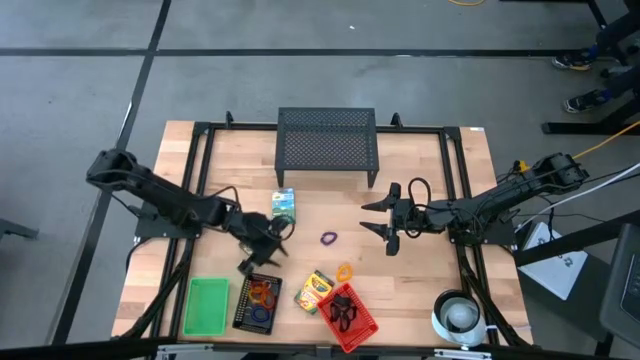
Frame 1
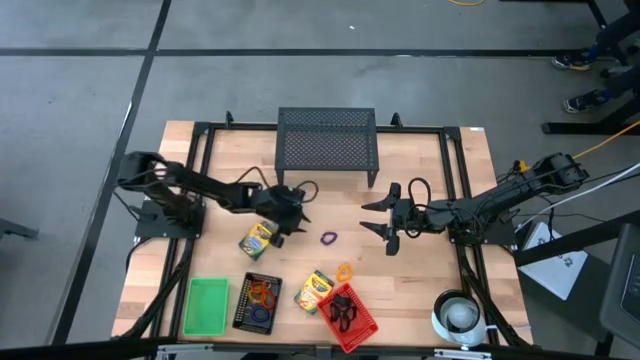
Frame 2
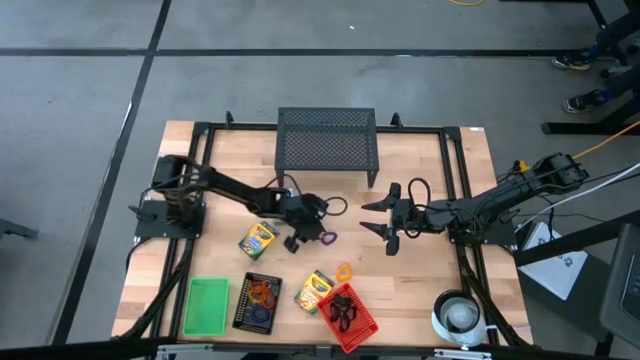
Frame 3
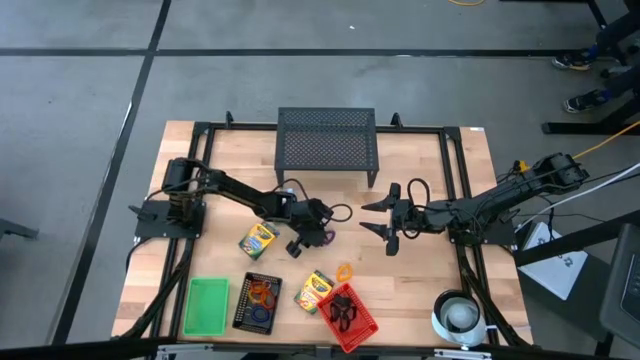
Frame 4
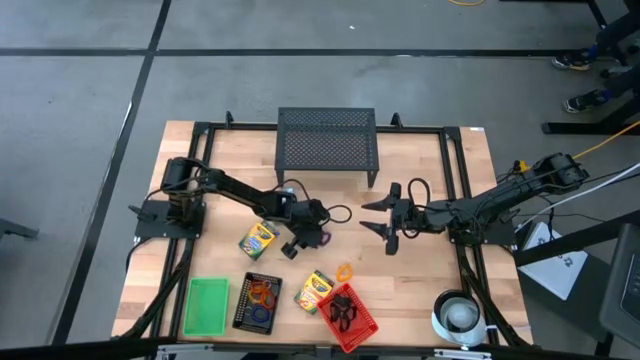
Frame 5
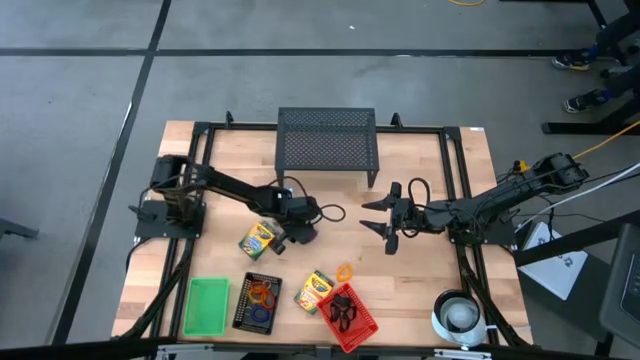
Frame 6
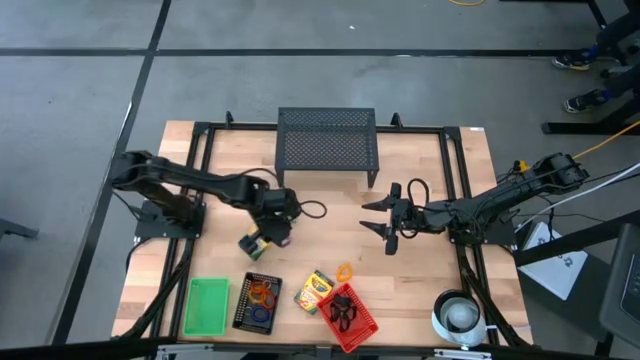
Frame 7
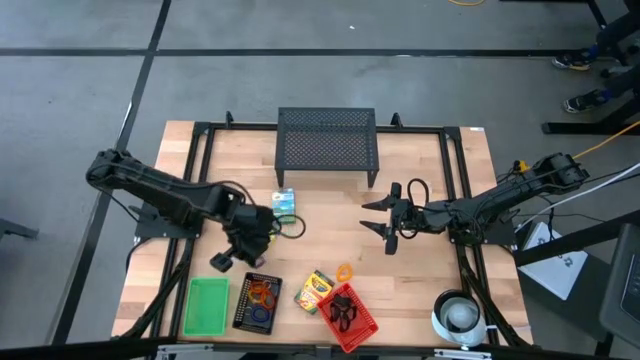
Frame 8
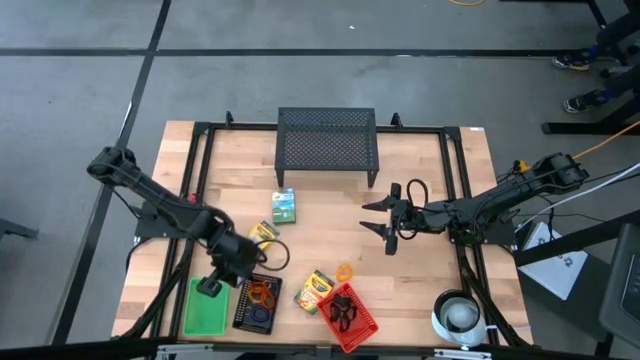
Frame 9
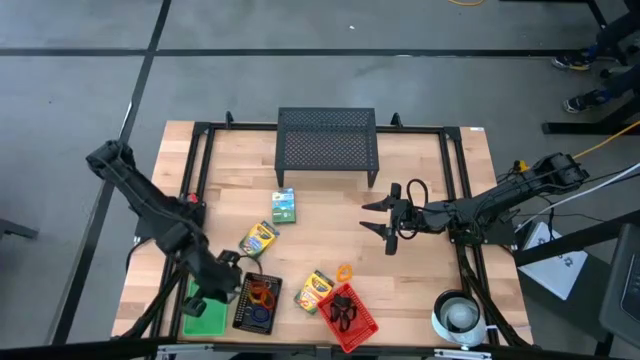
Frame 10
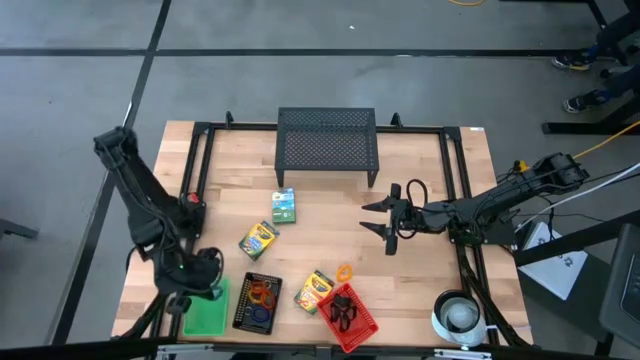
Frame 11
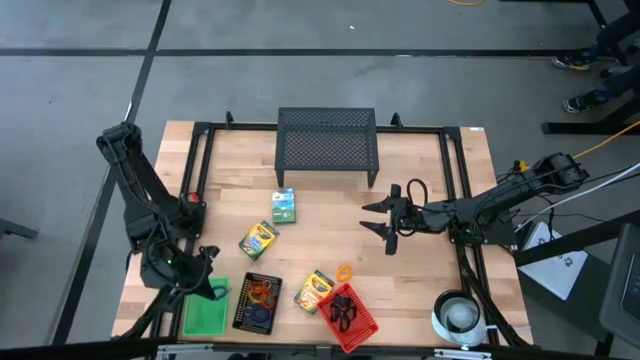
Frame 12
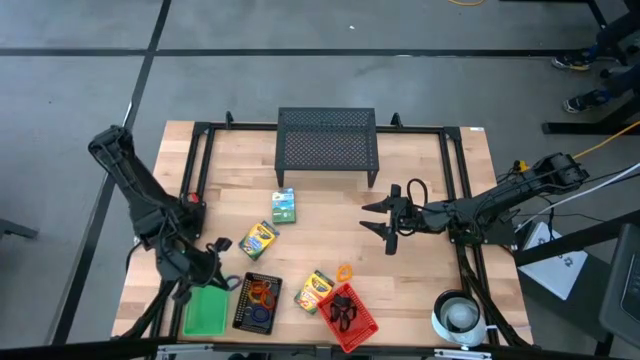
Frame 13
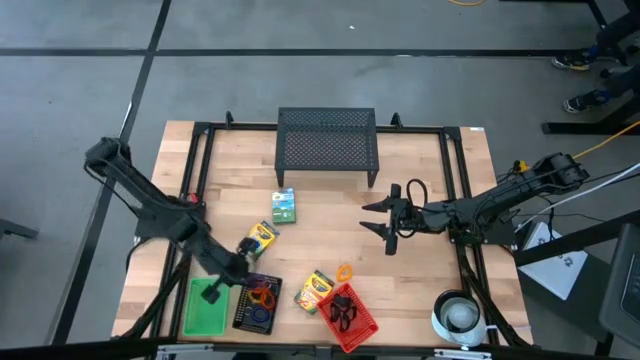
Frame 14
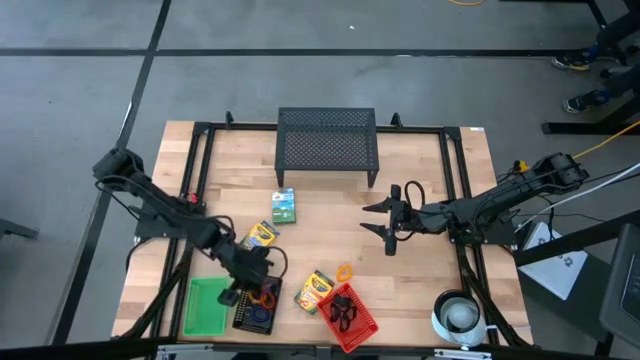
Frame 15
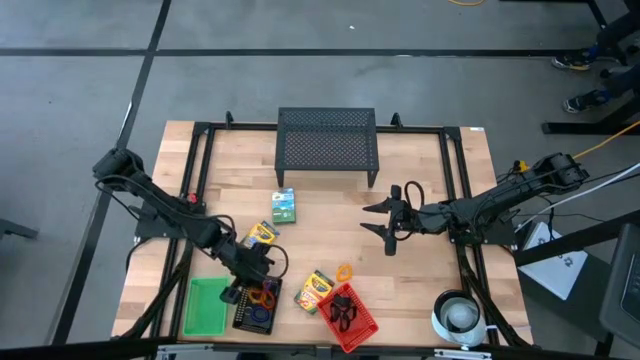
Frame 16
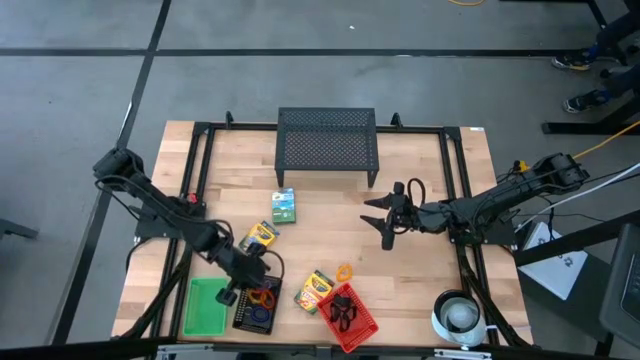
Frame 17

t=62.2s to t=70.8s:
Task: Pick & Place Office Desk Supplies
Put the purple spring keychain into the black bin

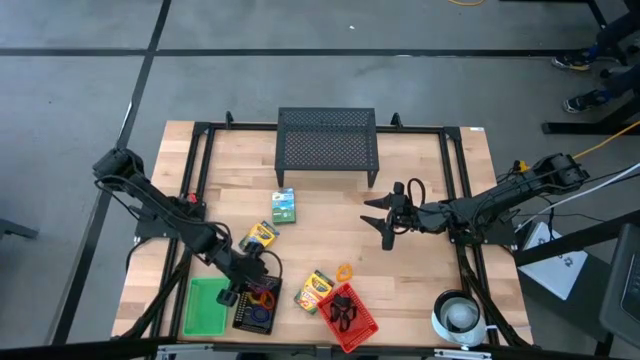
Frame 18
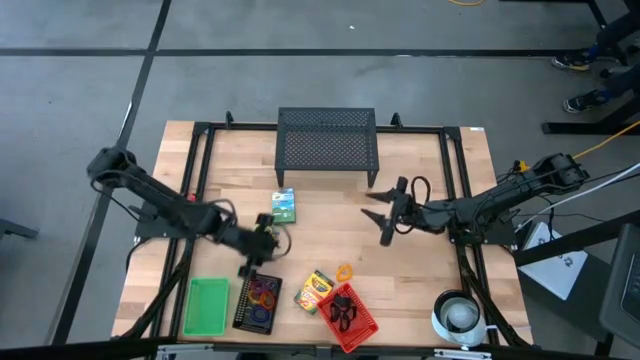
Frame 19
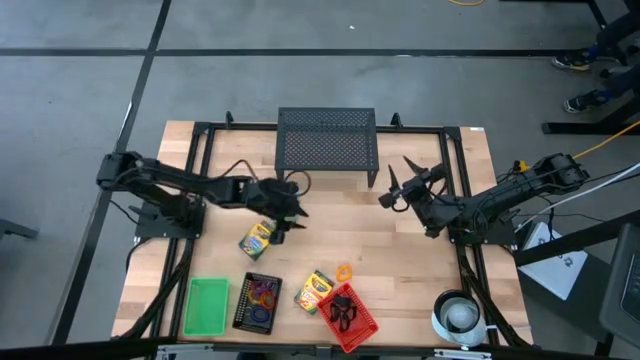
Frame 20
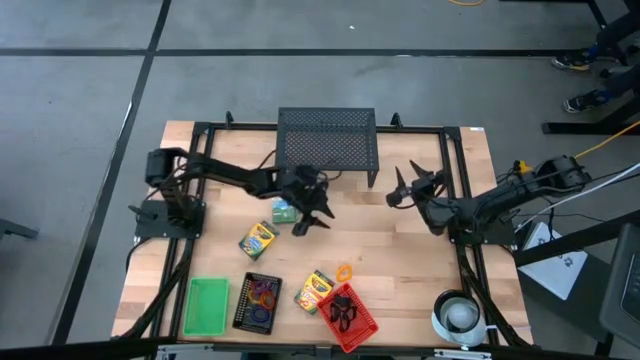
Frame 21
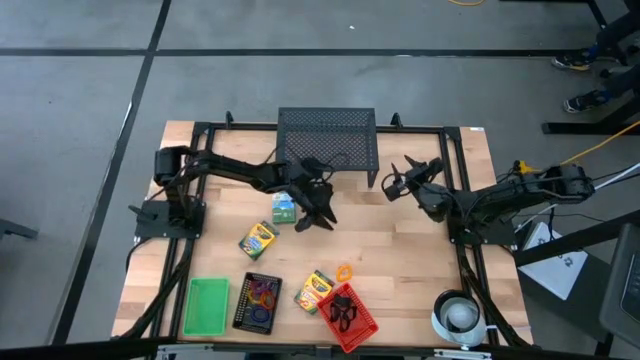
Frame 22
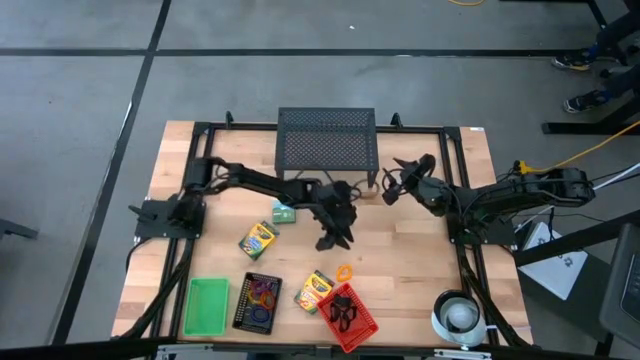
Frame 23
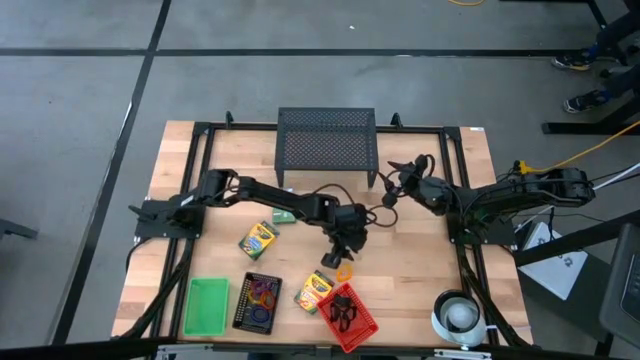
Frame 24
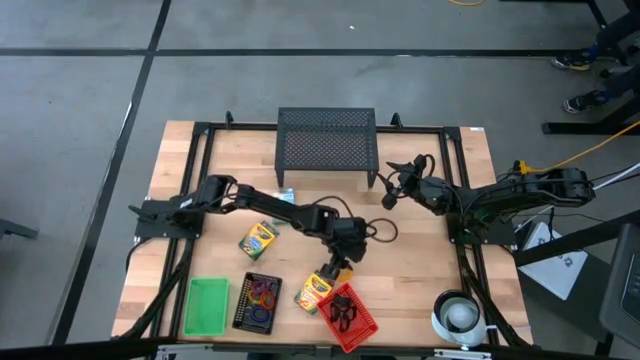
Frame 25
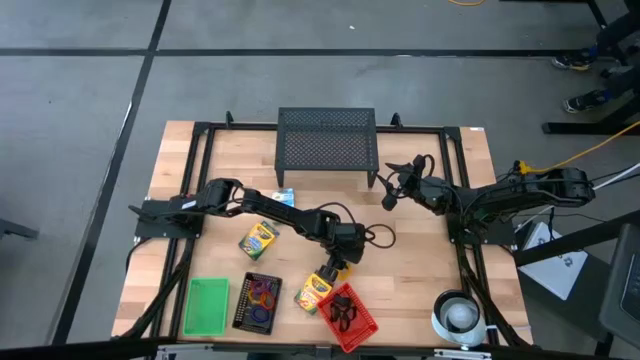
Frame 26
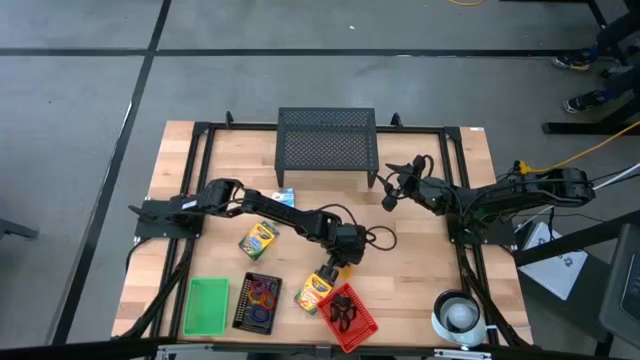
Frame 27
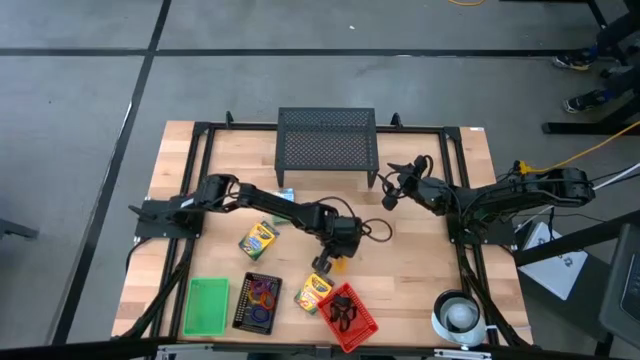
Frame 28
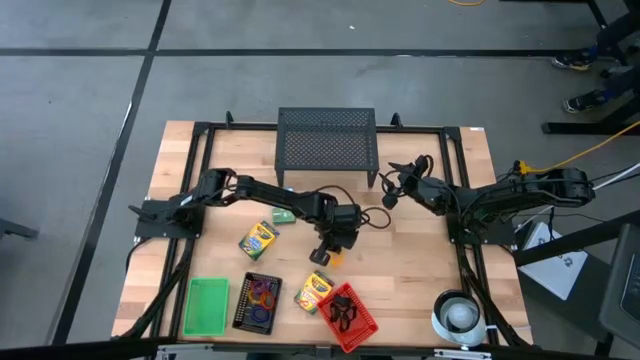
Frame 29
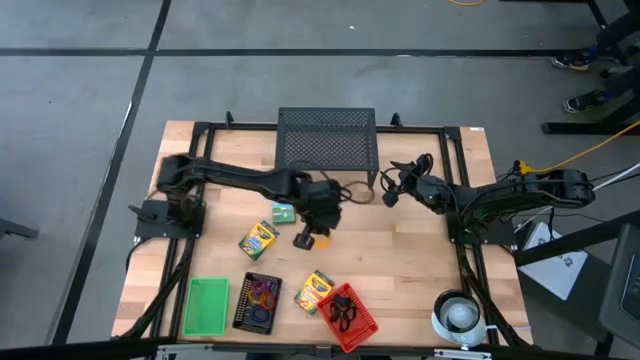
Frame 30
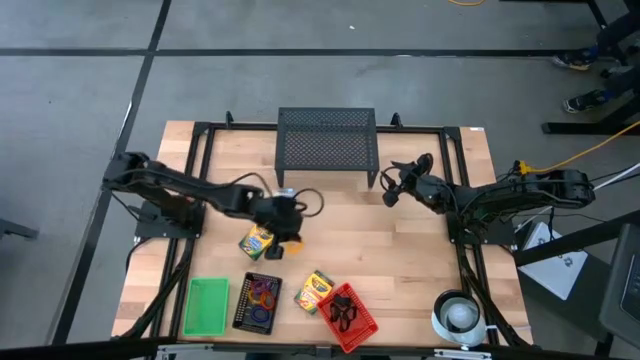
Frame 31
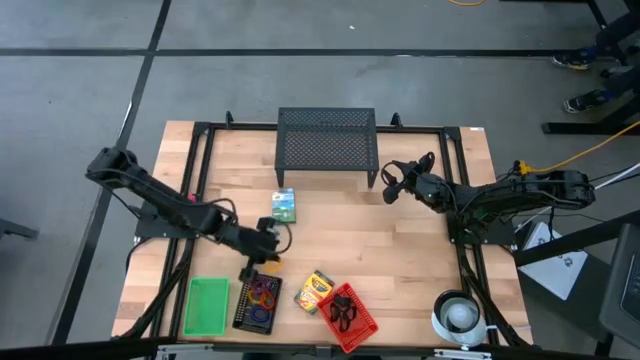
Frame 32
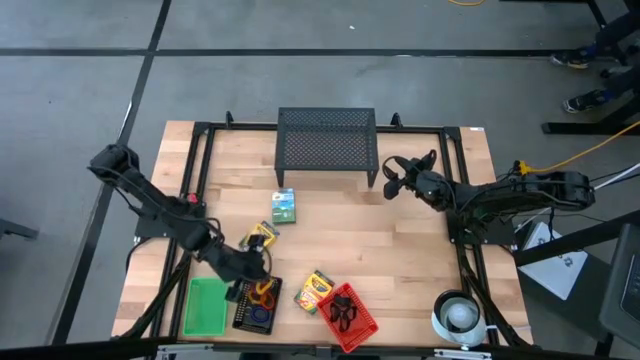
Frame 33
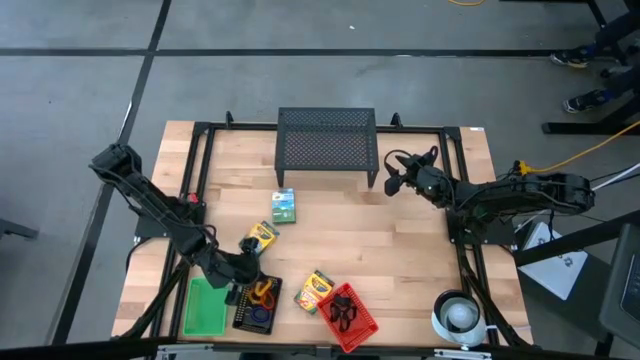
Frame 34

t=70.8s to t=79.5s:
Put the yellow spring keychain into the black bin

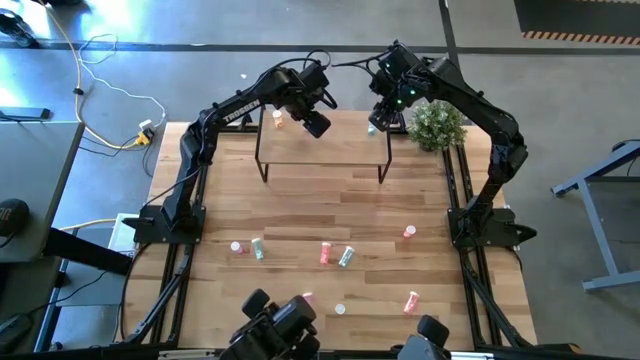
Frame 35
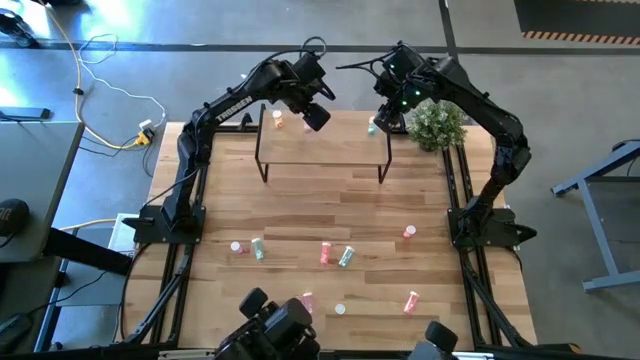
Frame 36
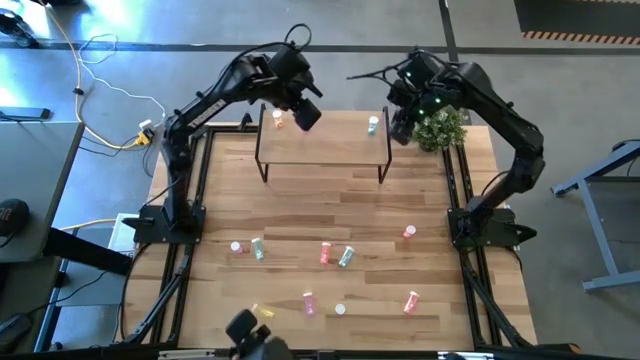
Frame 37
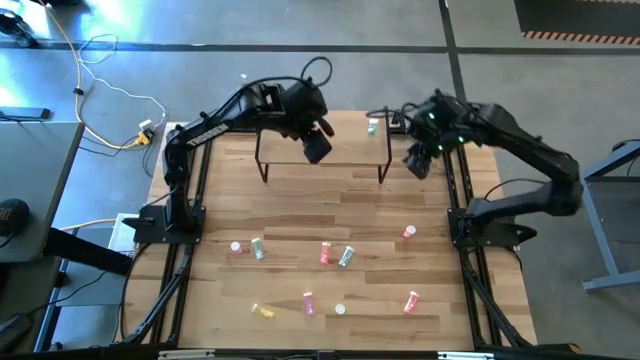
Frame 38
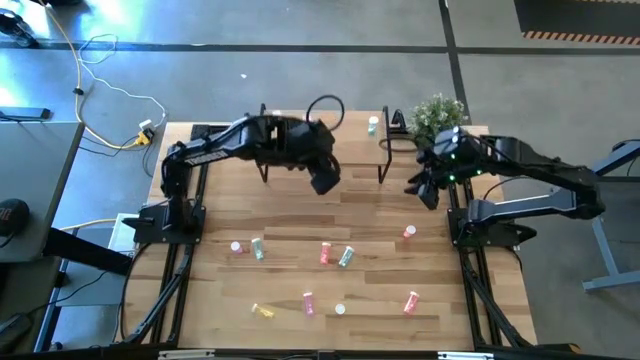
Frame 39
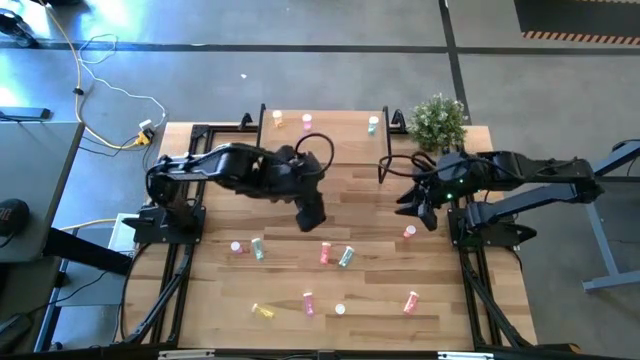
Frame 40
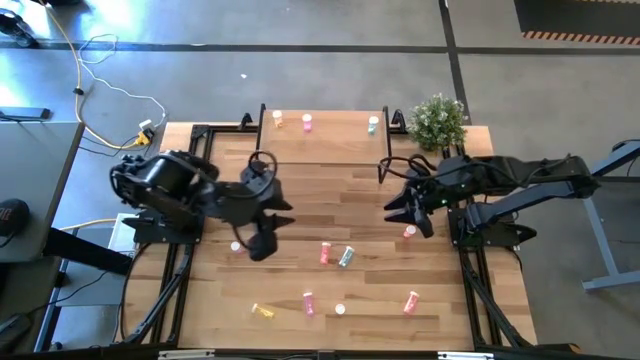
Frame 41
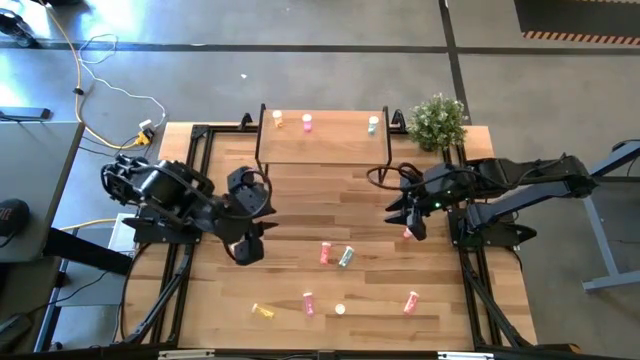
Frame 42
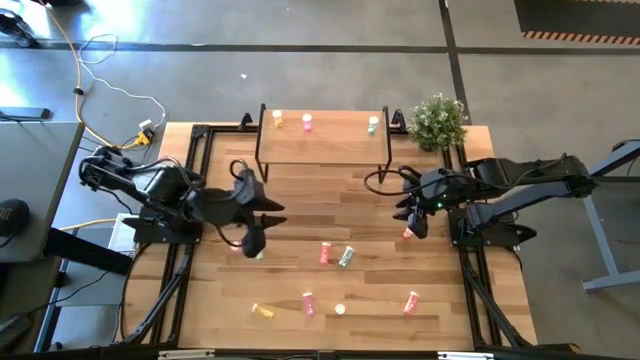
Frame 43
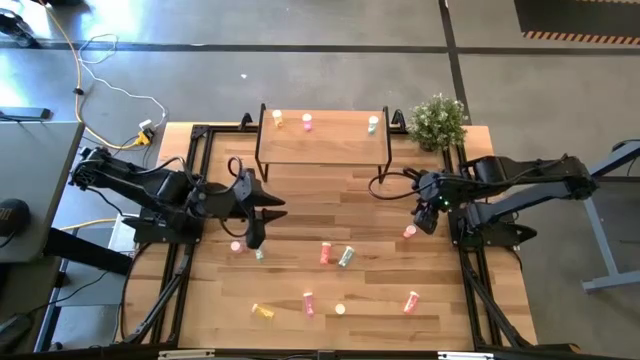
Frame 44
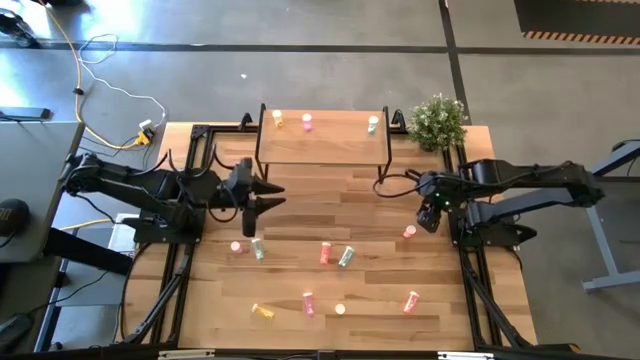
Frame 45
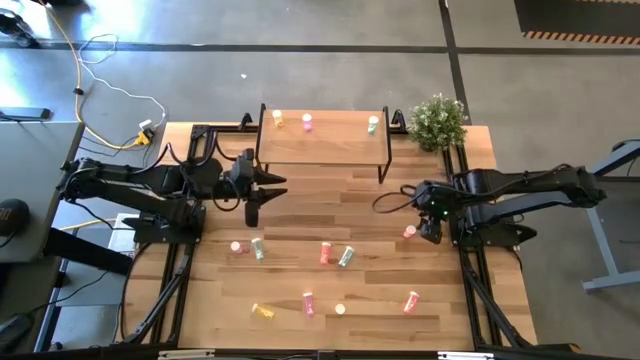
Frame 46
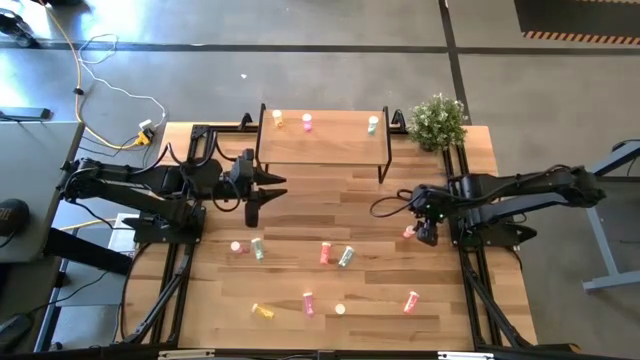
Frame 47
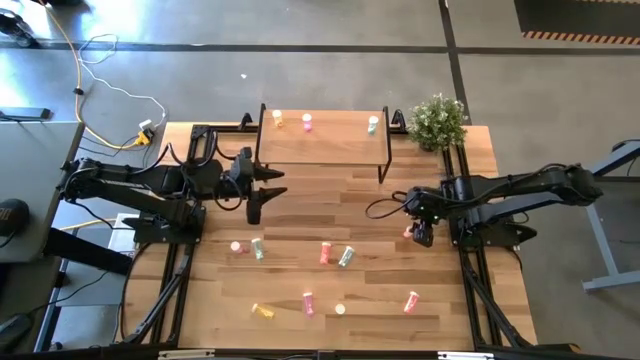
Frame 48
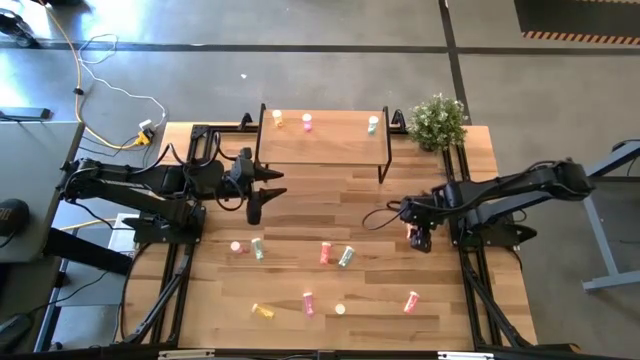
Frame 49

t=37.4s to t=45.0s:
Task: Pick and place medicine bottles onto shelf by color
Put the top pink pill bottle on the shelf
